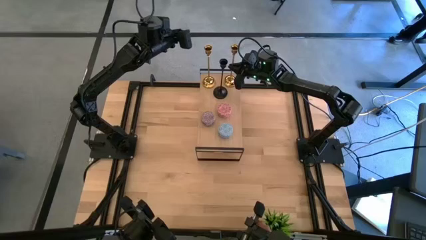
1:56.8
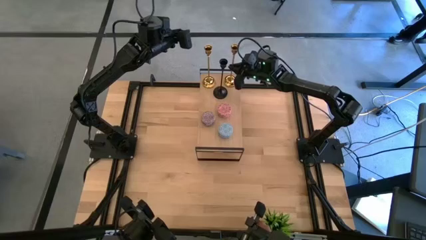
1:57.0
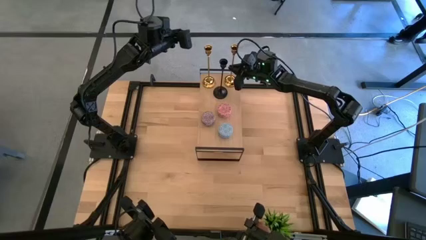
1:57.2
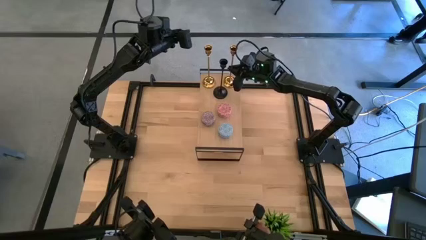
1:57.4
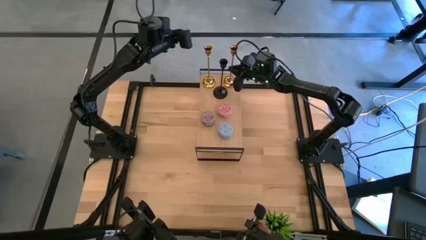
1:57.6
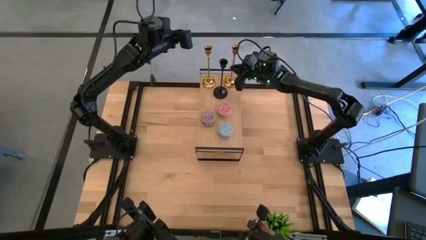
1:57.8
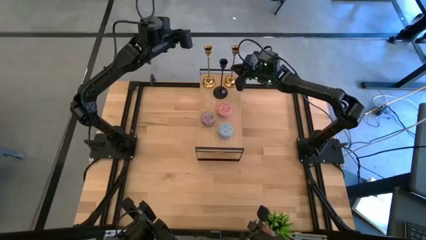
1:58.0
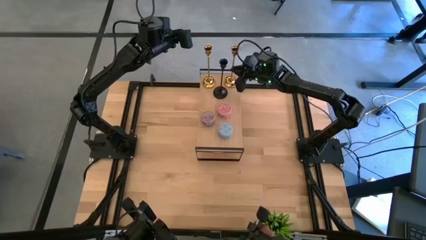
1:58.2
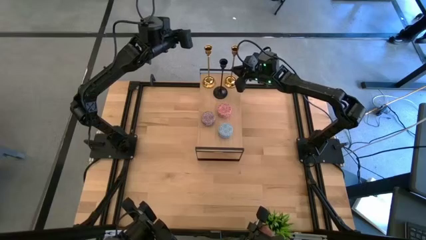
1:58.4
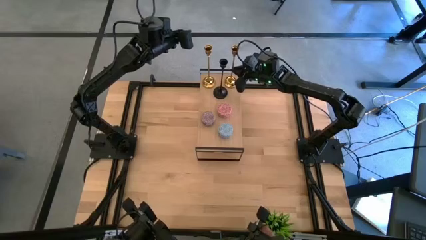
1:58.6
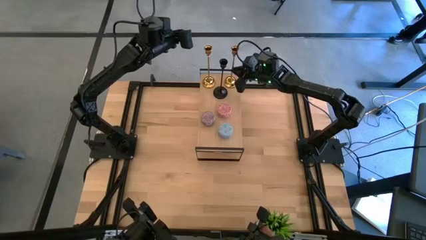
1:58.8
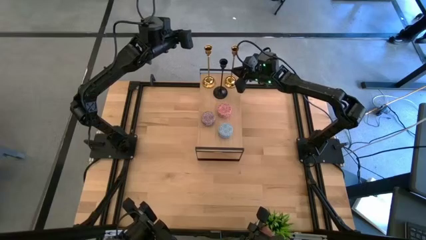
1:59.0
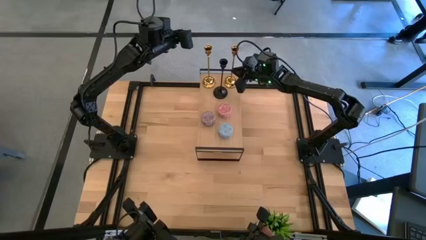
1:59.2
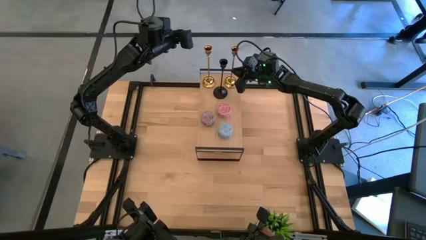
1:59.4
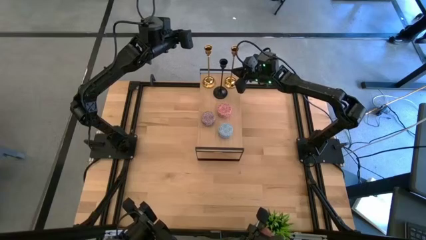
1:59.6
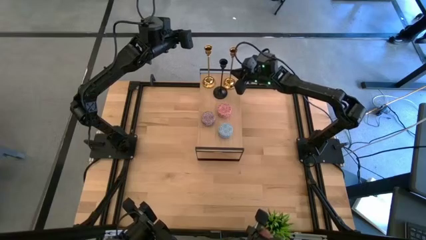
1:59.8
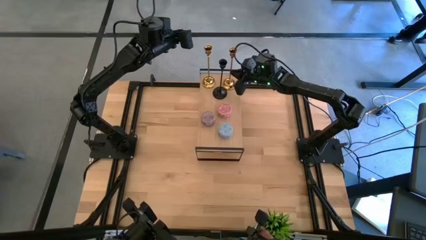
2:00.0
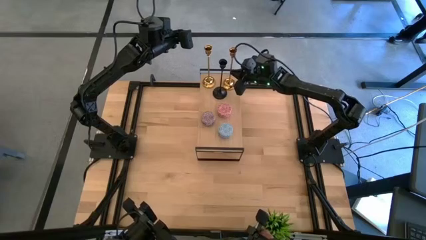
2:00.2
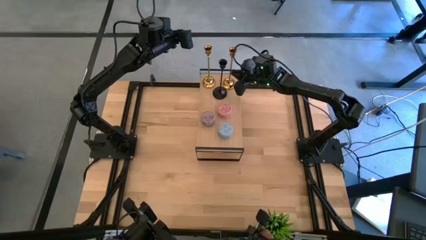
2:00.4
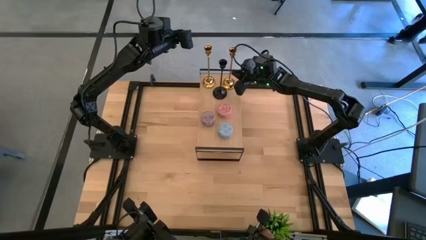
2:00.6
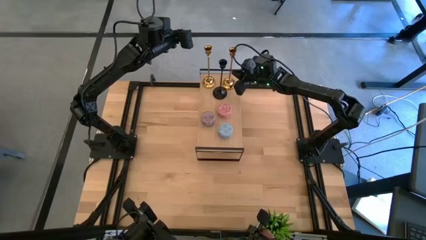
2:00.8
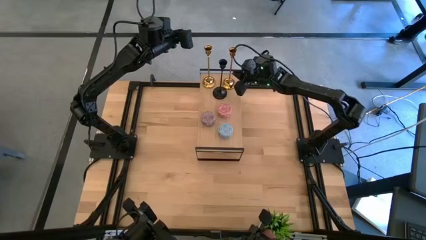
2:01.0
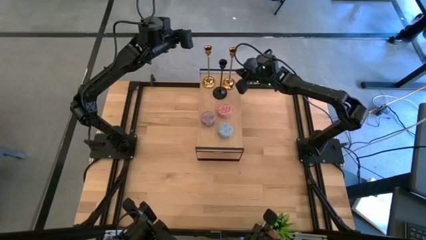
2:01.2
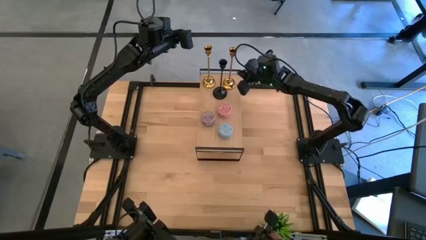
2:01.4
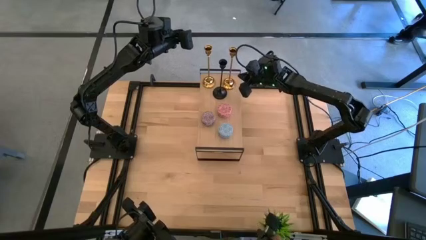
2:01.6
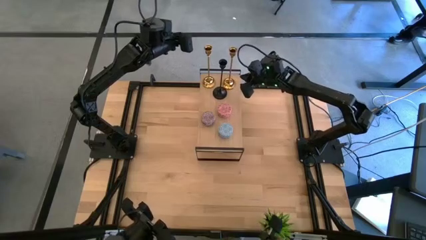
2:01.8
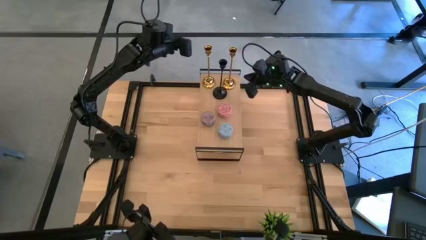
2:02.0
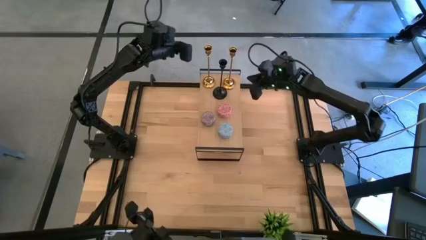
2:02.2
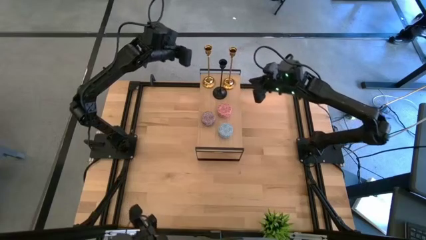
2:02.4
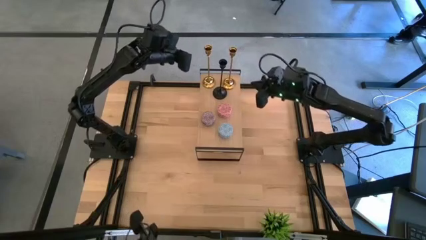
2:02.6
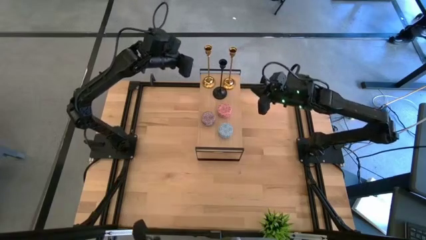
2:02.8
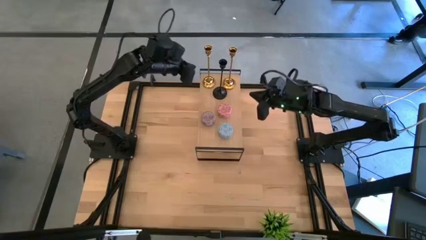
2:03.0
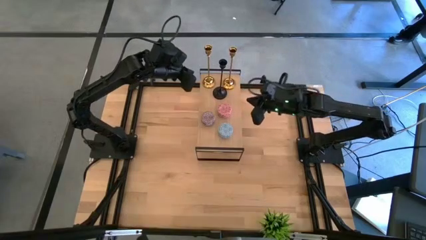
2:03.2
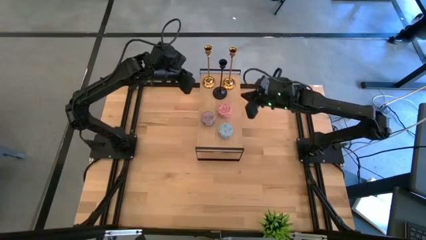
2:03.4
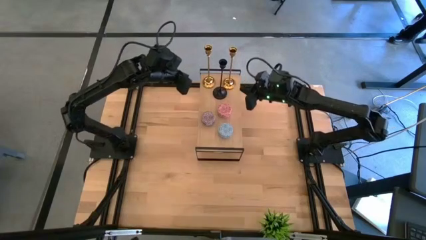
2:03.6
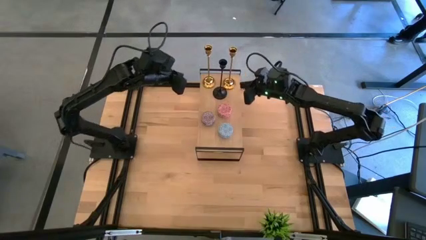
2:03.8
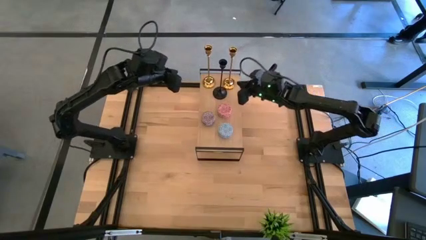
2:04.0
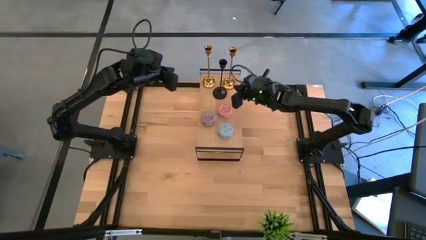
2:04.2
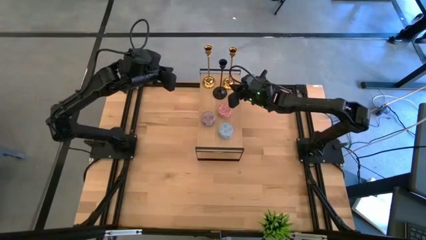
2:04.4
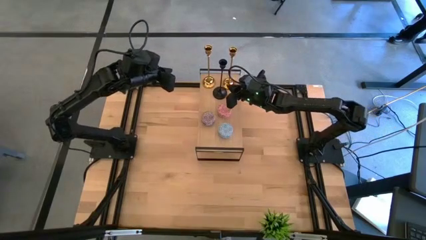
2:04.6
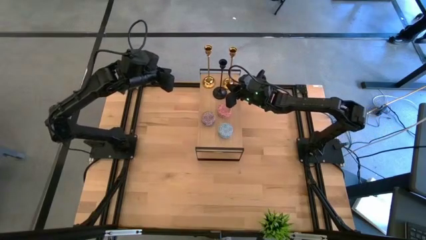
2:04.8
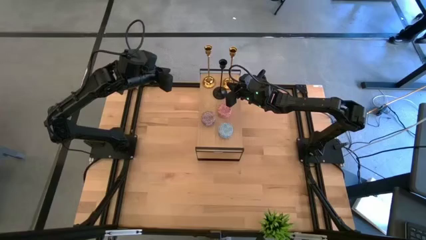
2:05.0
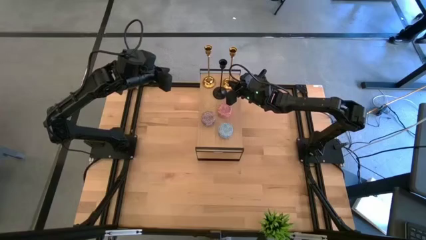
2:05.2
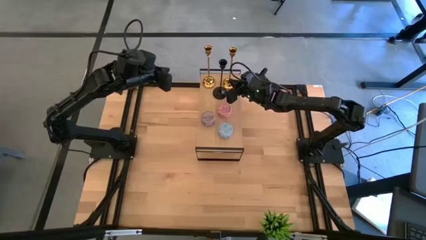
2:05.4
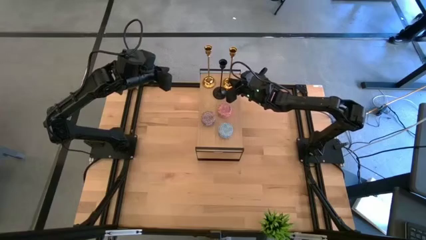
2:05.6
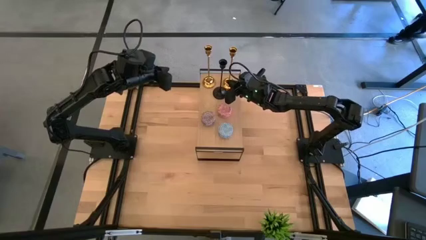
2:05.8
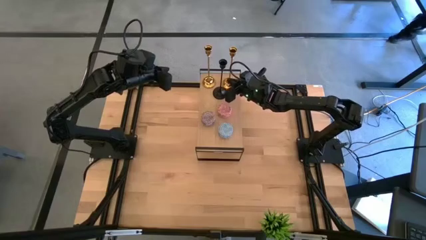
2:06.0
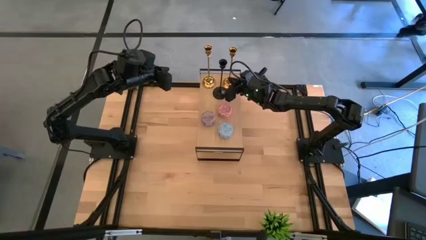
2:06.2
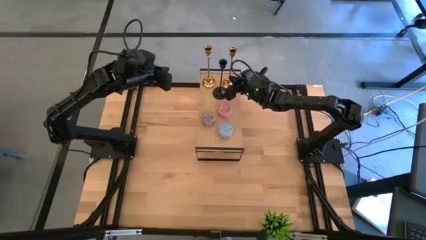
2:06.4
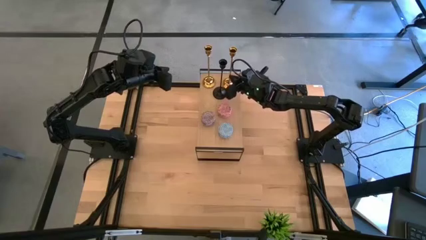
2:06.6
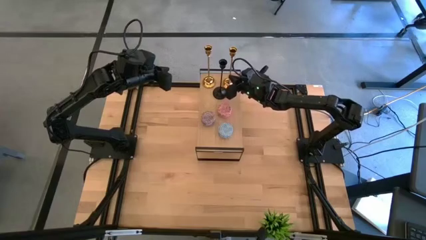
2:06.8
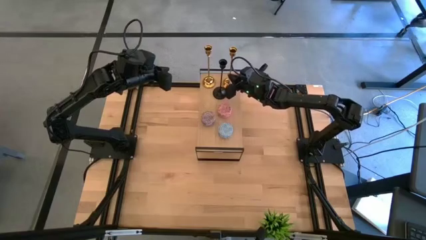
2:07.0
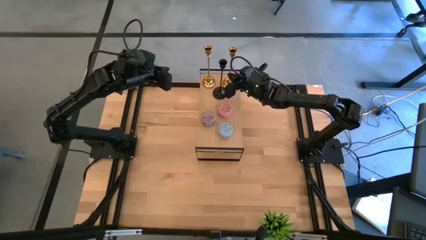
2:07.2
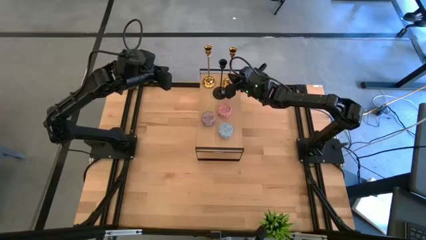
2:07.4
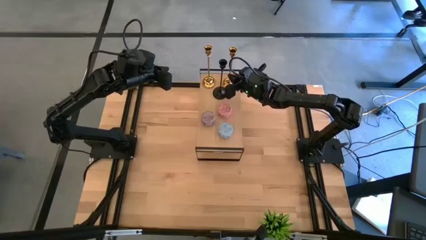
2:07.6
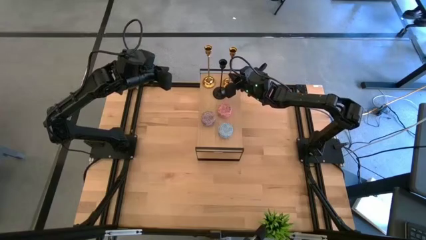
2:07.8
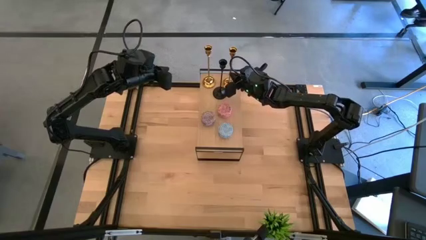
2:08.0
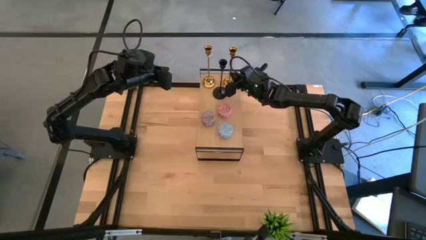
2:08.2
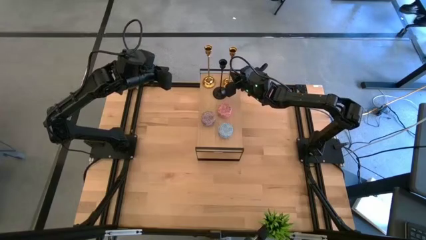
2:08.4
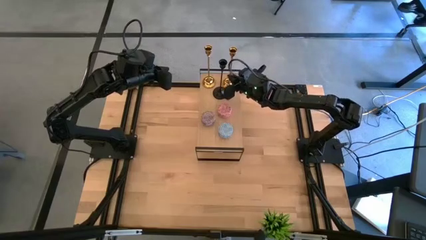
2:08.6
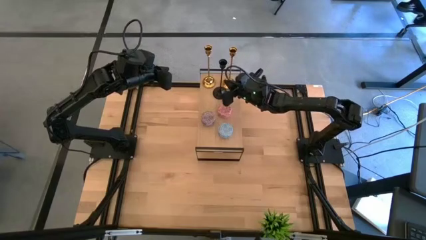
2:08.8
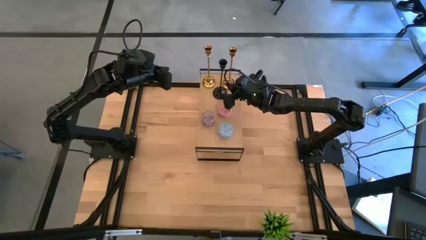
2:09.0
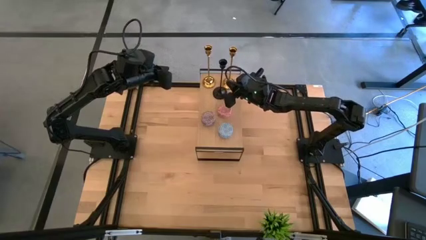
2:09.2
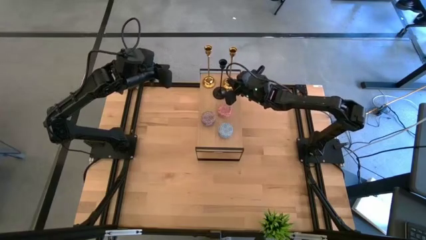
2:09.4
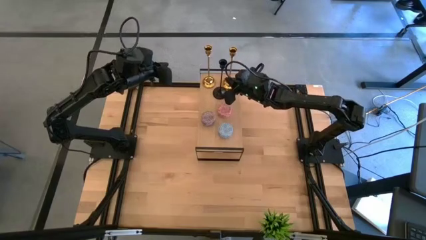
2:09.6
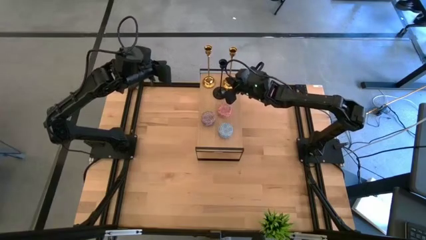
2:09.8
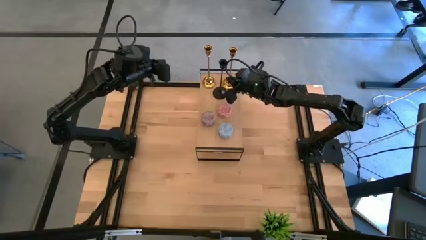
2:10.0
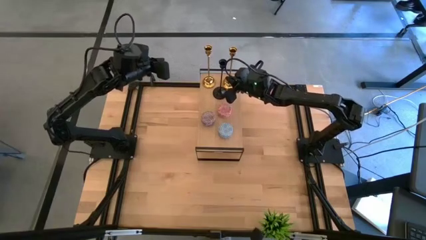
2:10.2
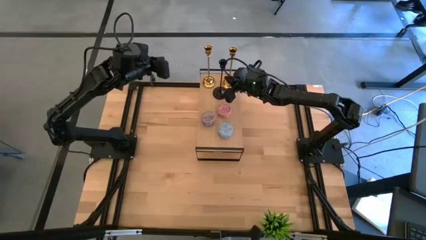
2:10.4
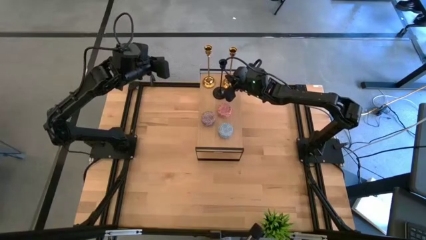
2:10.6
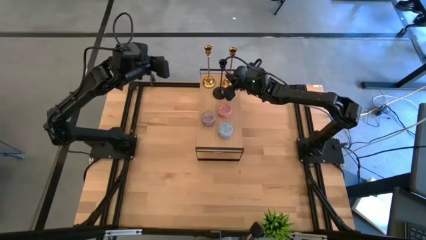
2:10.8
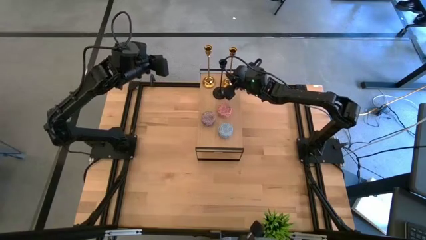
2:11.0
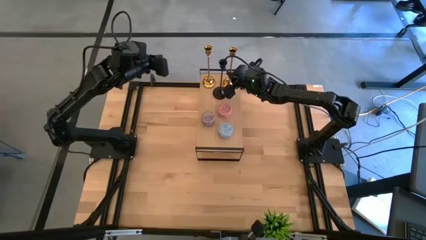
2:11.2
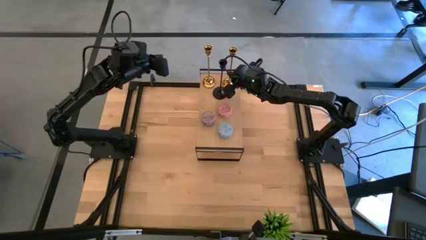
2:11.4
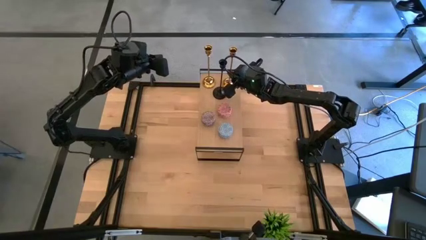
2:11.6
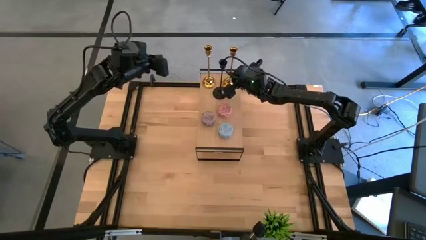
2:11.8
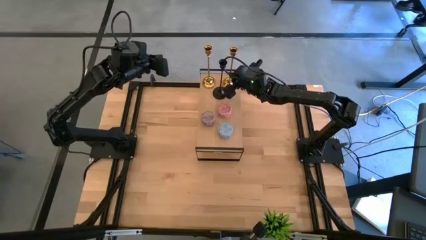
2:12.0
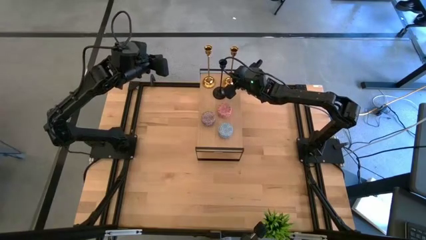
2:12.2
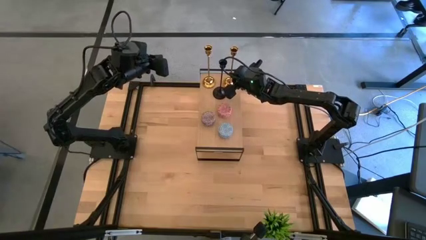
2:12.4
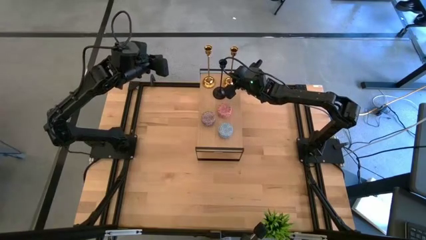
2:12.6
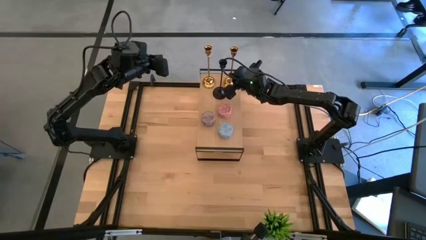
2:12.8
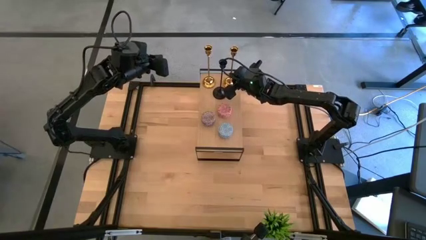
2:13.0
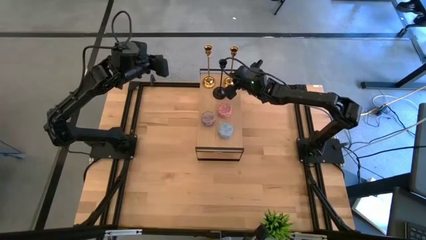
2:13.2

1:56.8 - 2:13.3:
Task: Pick & Place candle stick holders
Put the gold candle holder on the shelf
